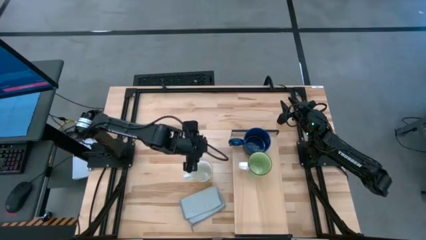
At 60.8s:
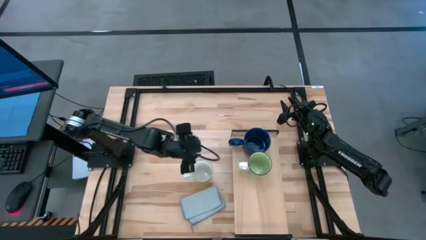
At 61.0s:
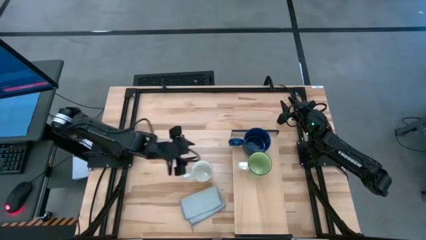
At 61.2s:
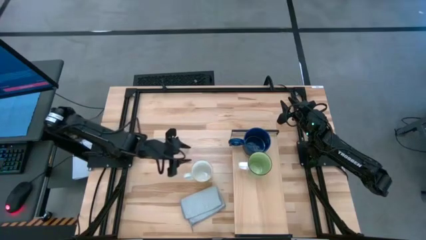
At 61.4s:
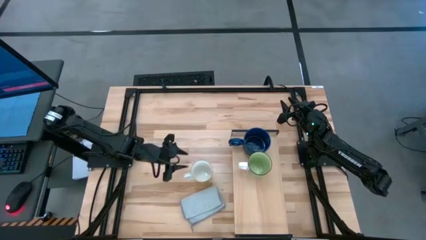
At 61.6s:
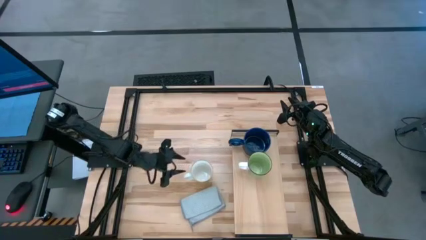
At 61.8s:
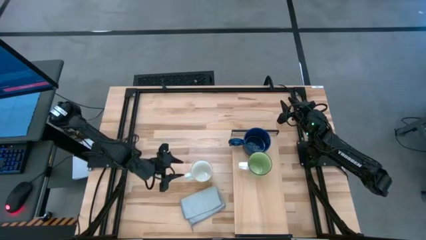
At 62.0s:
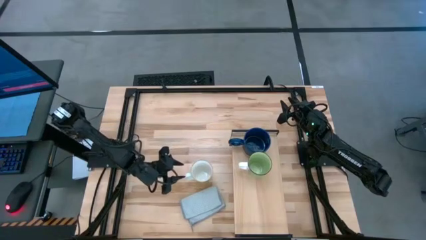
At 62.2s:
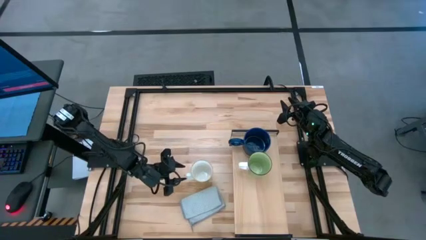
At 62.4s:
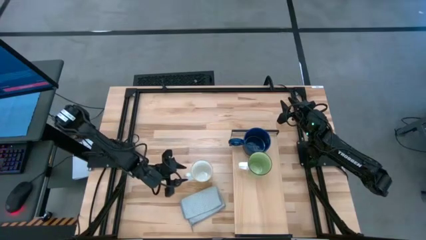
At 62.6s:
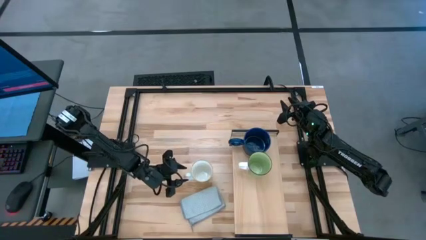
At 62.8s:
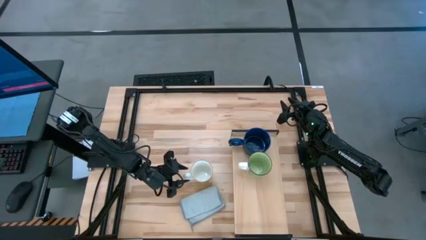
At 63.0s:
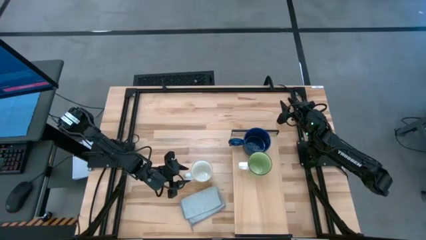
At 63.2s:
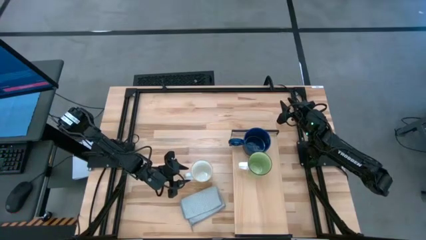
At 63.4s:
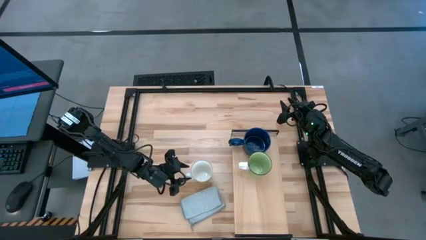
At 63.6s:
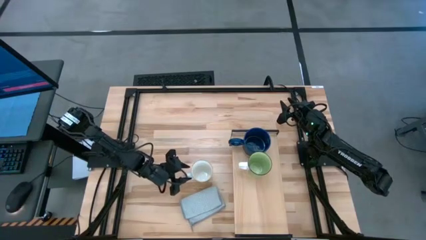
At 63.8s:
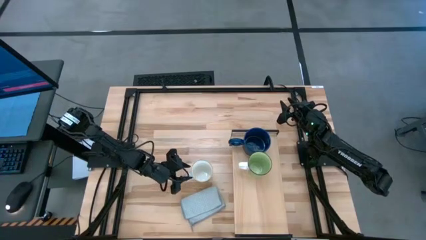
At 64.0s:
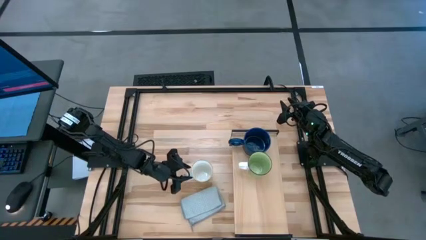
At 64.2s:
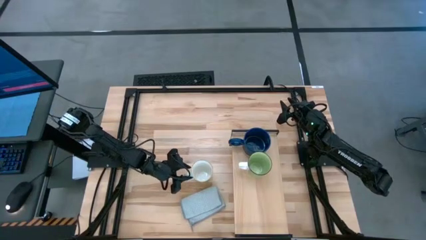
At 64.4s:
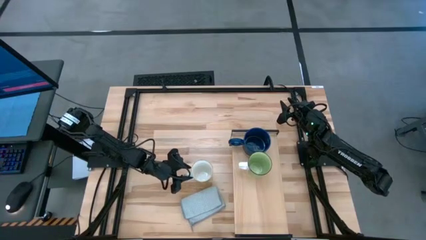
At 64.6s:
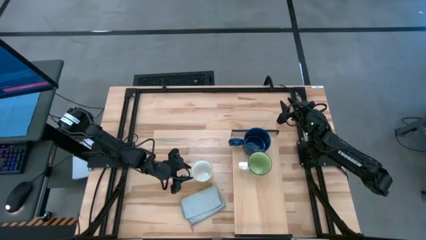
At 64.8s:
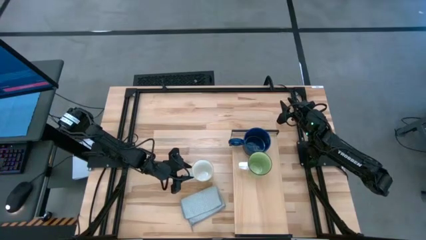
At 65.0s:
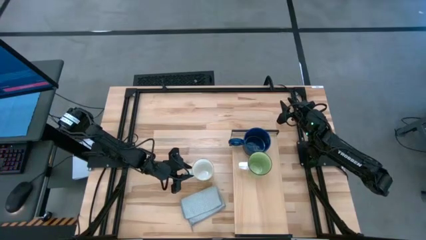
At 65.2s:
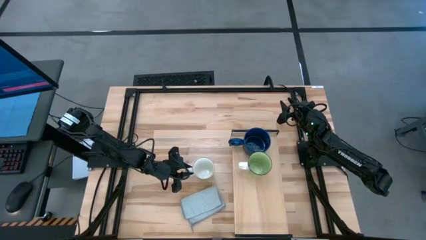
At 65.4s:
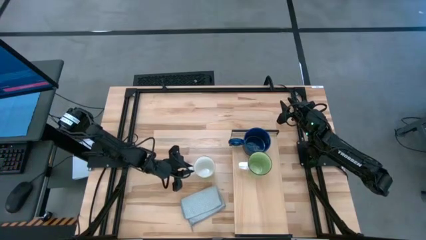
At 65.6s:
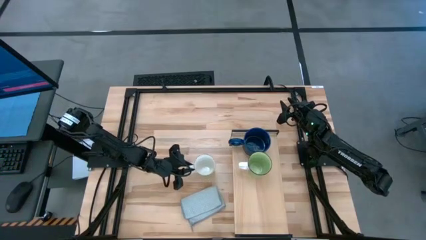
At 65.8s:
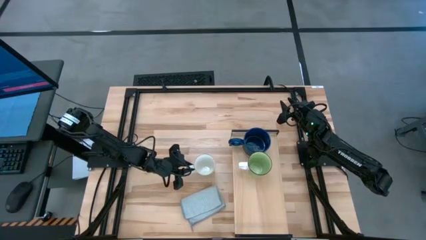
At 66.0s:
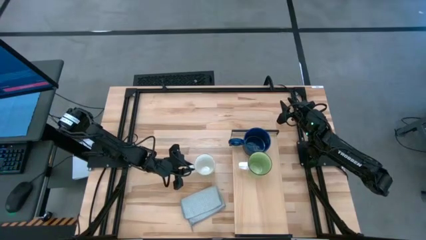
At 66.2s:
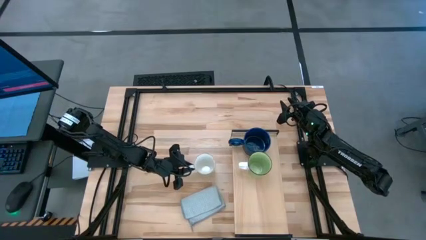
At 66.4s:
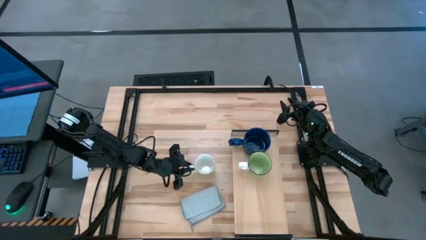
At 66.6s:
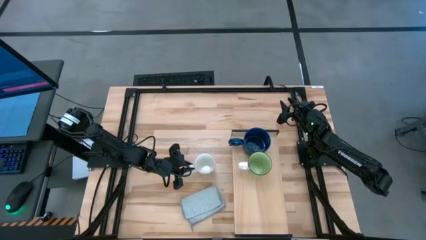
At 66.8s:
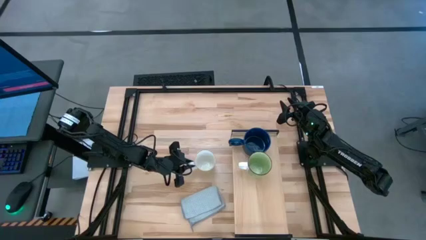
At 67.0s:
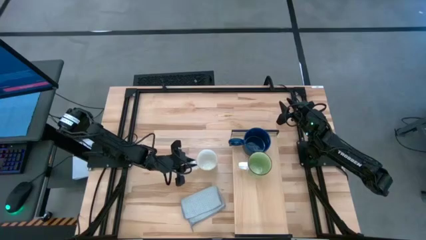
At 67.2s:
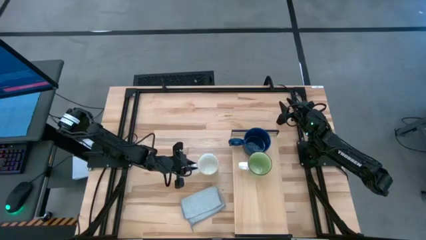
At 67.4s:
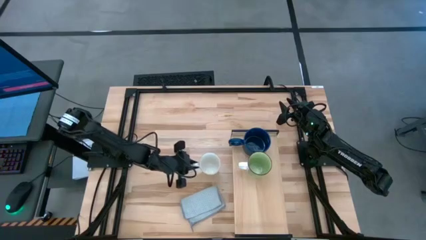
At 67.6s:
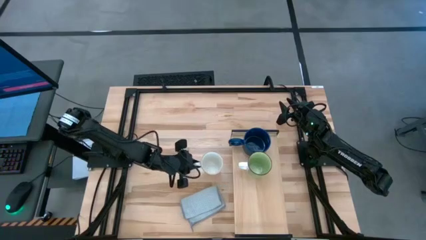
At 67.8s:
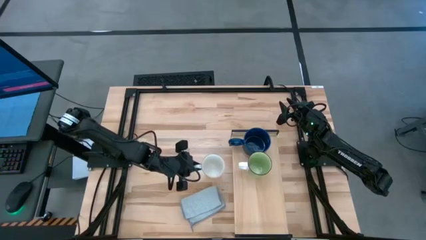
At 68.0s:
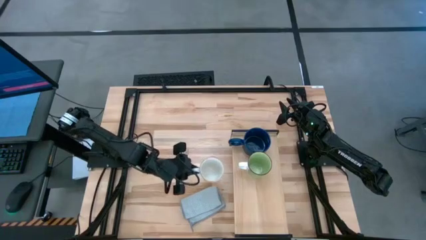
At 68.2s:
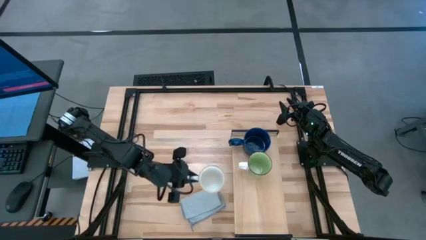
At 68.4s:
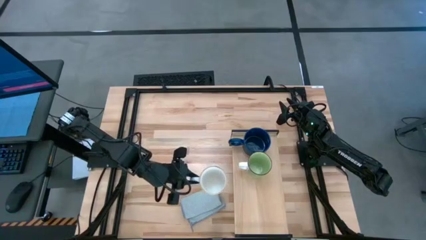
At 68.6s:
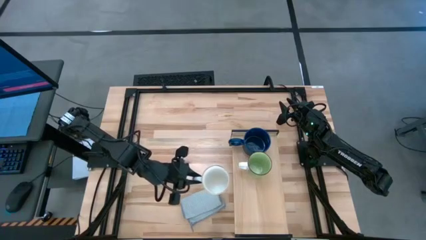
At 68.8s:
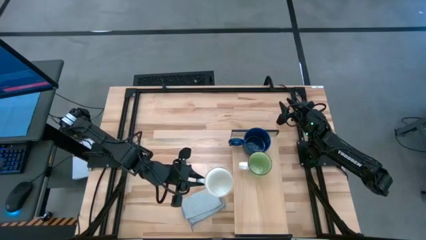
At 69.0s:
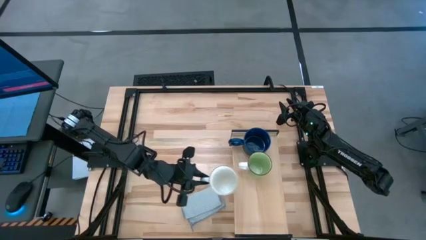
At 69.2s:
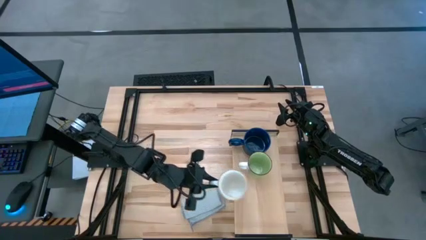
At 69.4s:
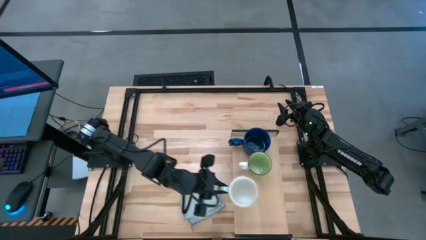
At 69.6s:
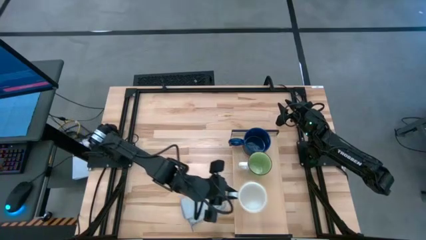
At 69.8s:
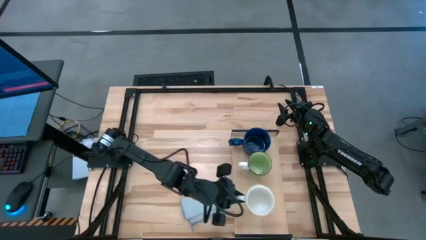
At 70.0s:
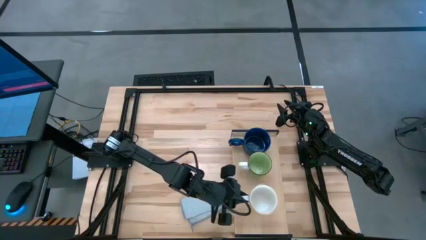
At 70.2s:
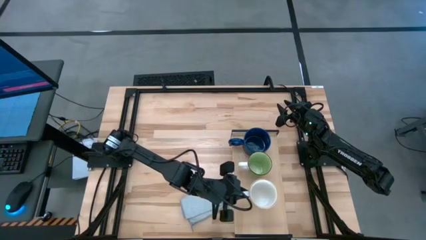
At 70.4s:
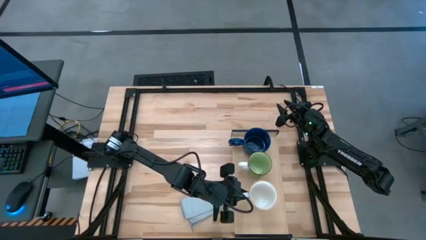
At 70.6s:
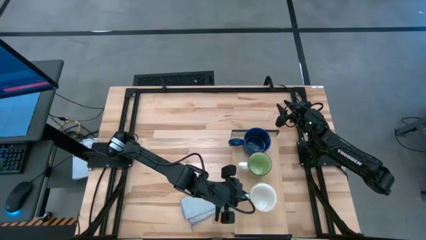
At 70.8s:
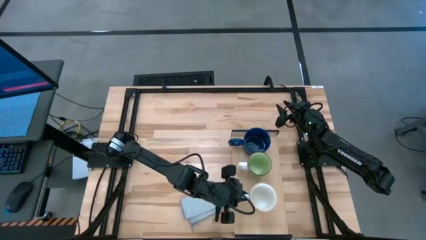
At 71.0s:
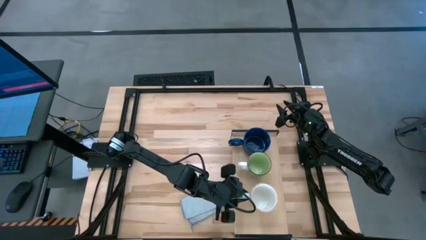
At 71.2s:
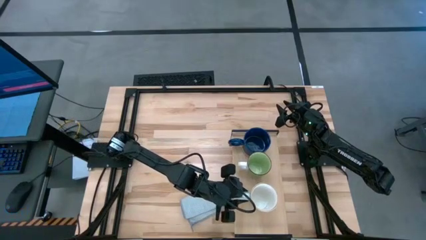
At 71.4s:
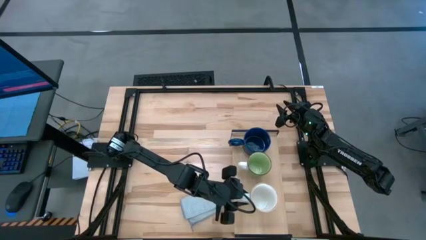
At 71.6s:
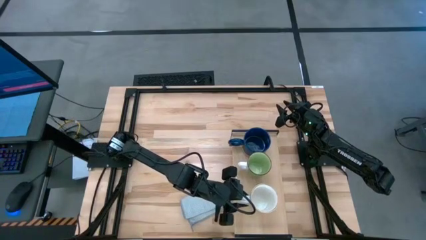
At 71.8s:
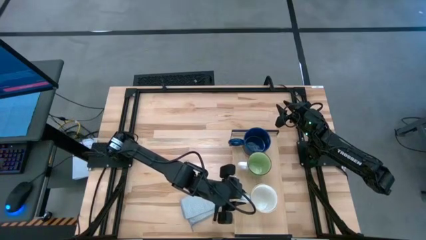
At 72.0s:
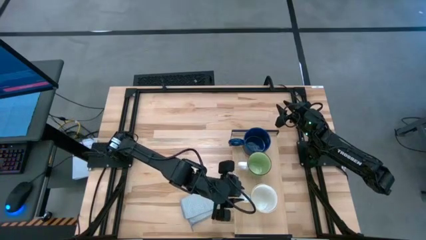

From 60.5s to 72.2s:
Task: Stack small to large cups/mugs on shelf
Put the white cup on the shelf

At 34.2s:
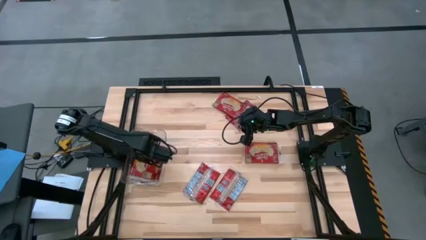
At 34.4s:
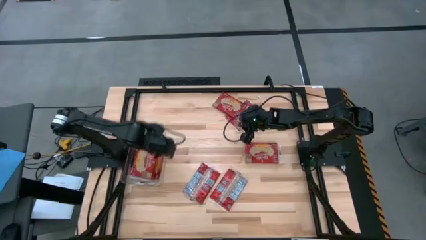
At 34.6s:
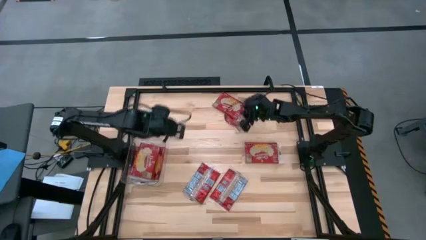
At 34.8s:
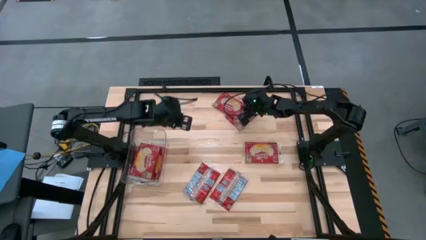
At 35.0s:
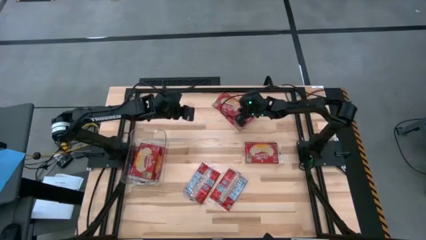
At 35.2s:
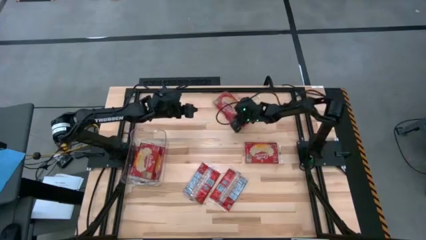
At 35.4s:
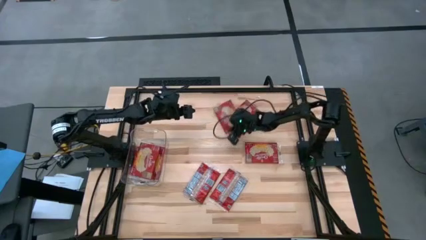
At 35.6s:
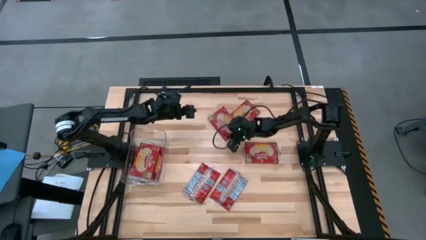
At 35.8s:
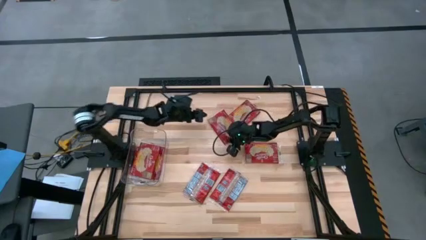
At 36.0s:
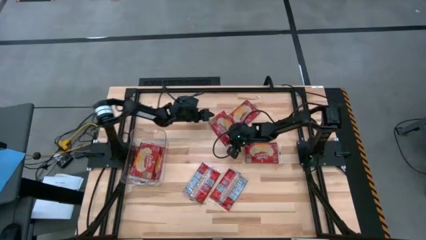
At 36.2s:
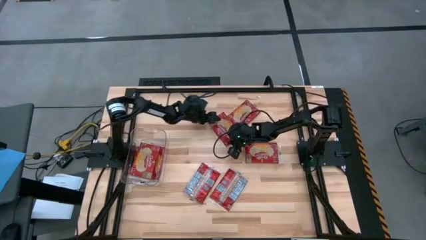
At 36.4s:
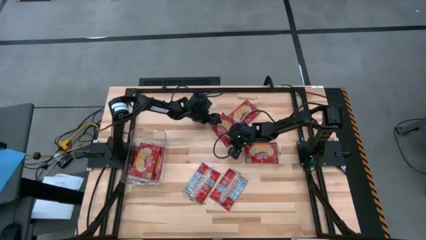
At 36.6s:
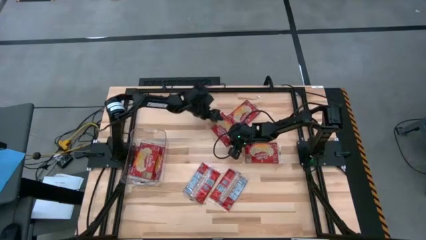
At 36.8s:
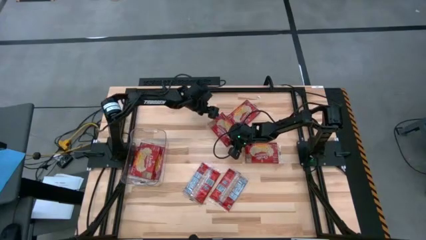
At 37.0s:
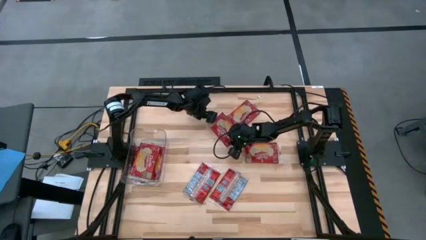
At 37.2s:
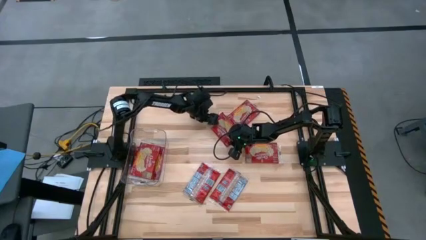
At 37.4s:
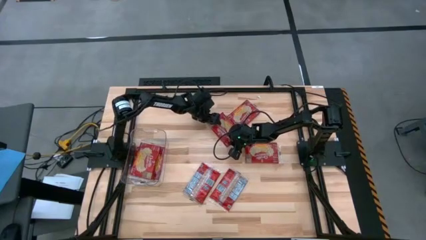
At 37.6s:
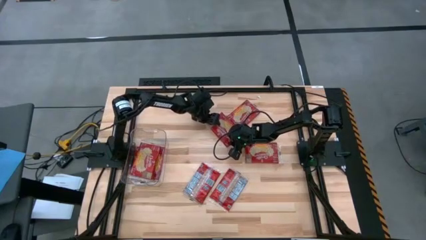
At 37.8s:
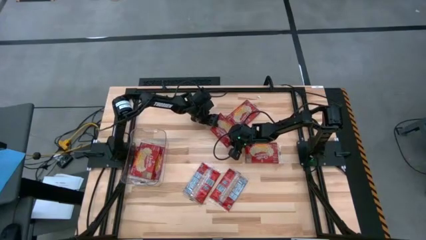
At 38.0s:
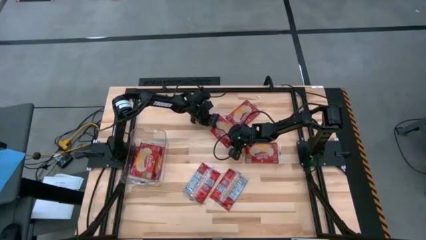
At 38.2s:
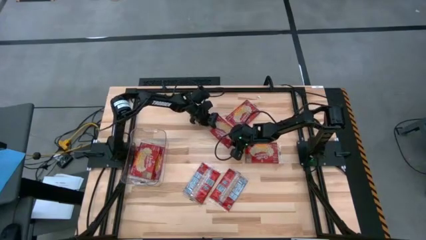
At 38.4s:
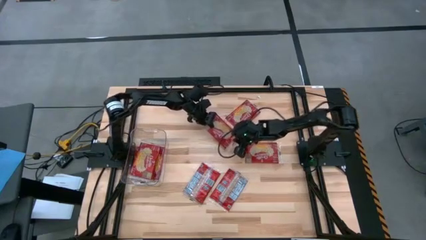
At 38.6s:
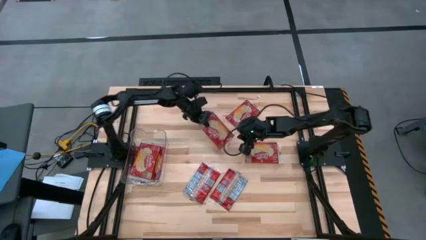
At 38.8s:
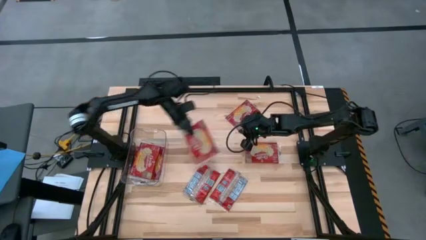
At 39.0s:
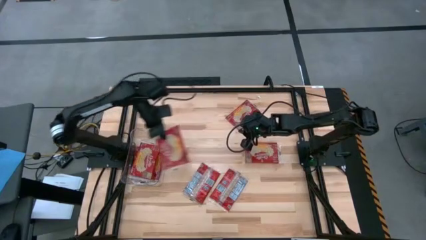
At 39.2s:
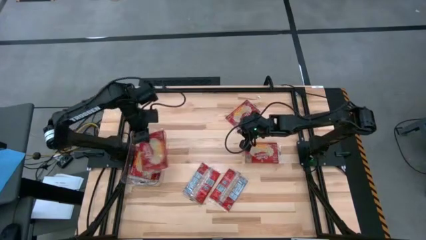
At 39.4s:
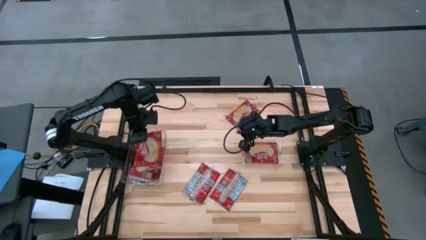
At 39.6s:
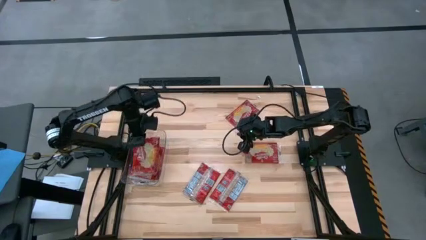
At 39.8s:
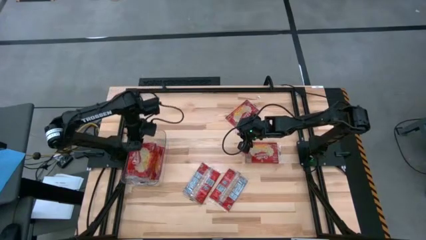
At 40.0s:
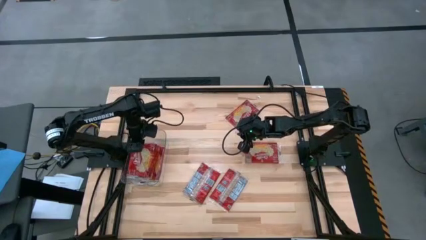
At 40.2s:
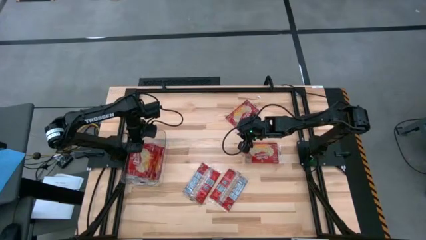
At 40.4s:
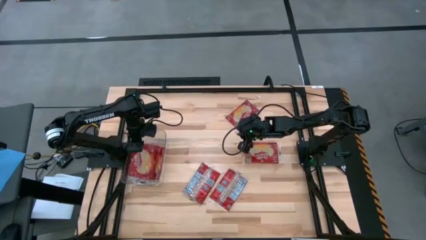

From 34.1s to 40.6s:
Task: Sort popcorn bags into baskets
Put the red popcorn bag into the transparent bin
